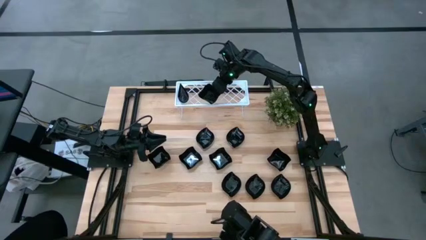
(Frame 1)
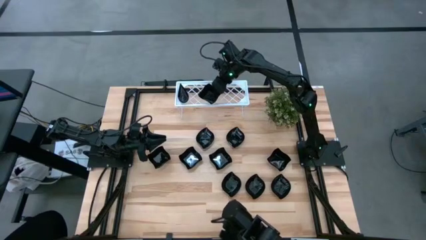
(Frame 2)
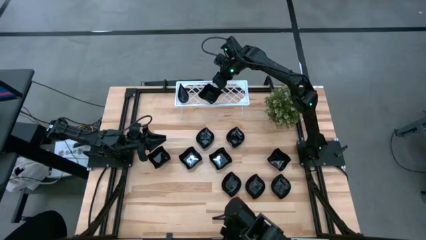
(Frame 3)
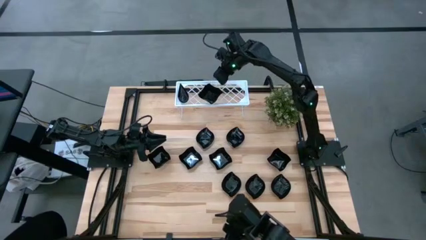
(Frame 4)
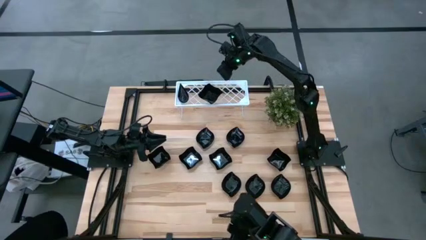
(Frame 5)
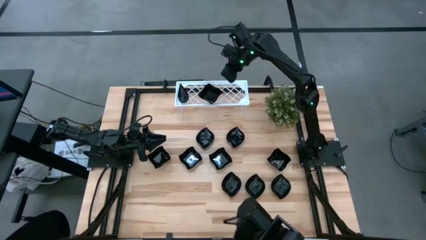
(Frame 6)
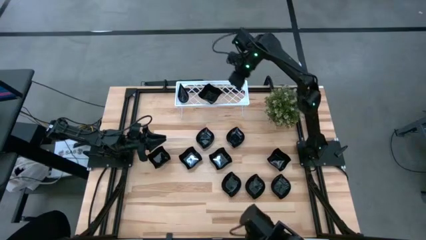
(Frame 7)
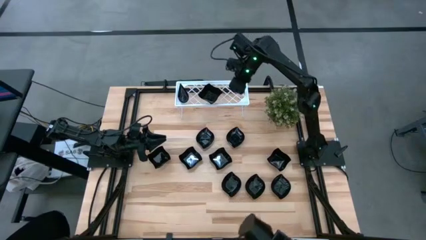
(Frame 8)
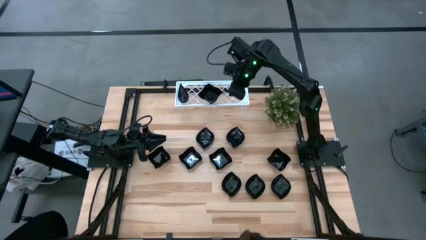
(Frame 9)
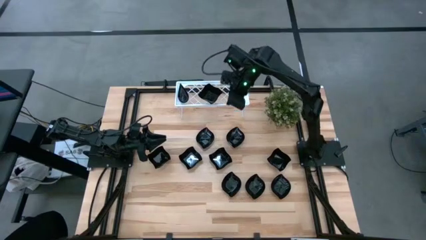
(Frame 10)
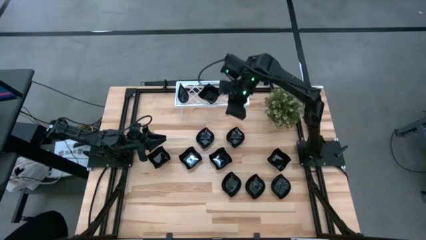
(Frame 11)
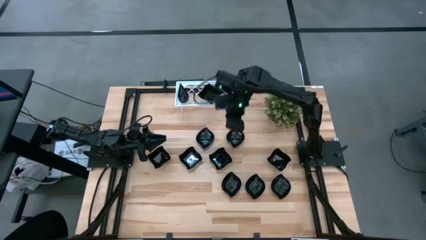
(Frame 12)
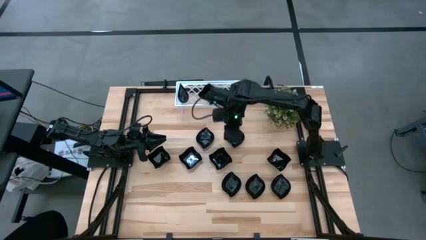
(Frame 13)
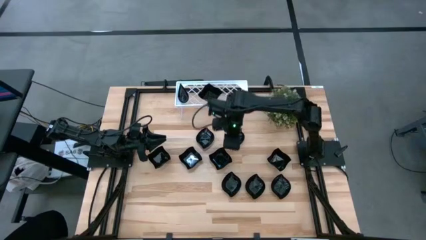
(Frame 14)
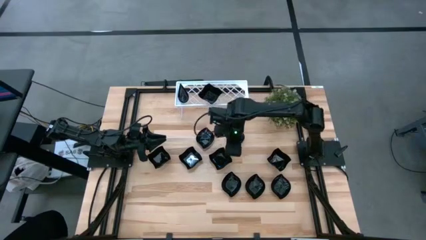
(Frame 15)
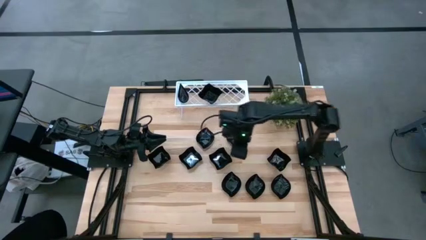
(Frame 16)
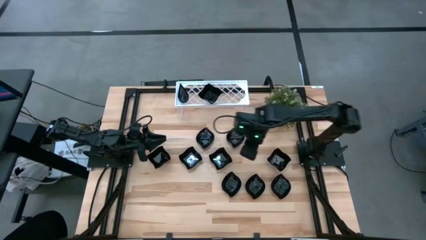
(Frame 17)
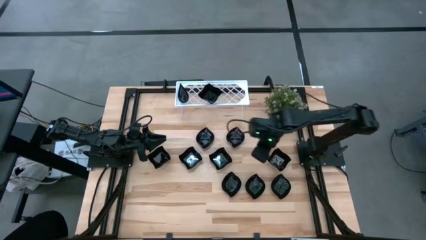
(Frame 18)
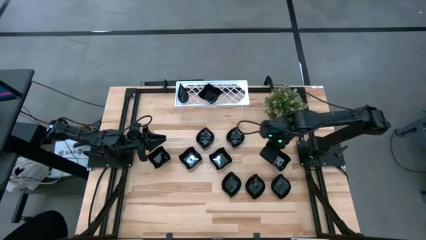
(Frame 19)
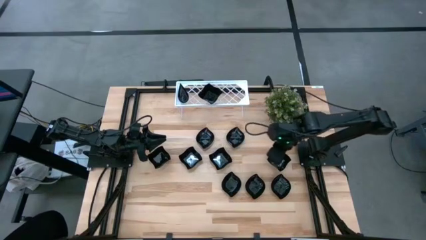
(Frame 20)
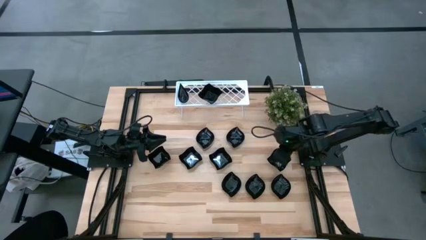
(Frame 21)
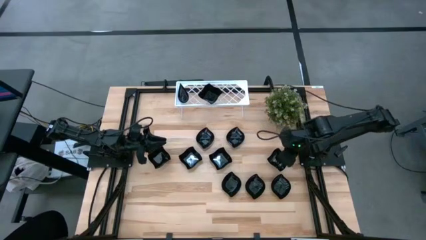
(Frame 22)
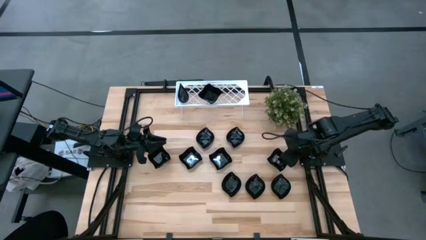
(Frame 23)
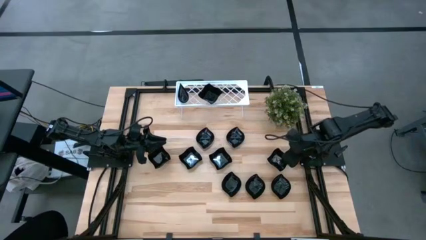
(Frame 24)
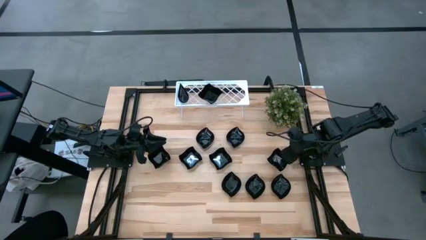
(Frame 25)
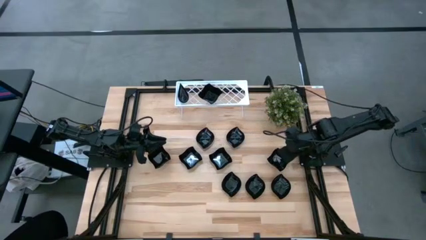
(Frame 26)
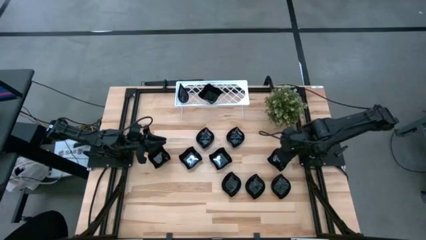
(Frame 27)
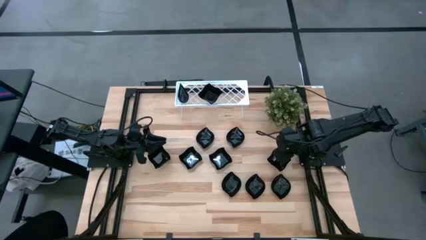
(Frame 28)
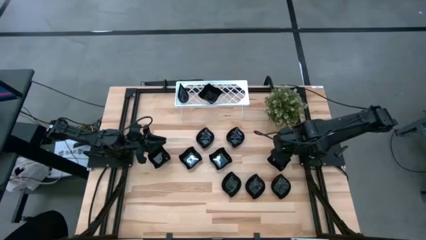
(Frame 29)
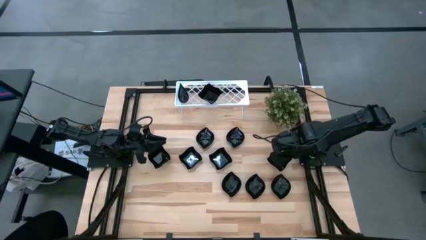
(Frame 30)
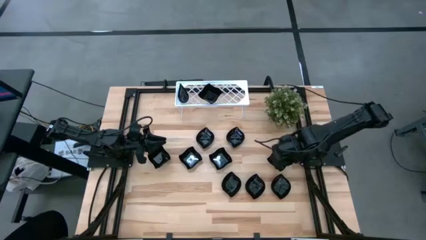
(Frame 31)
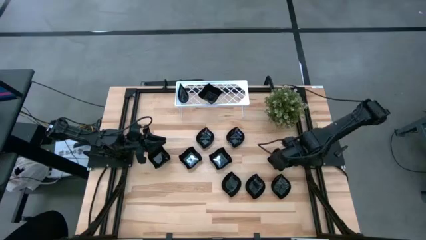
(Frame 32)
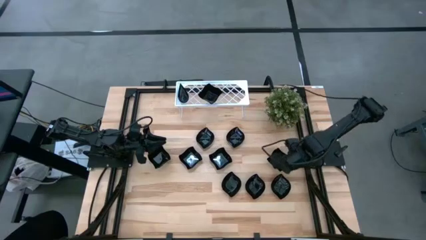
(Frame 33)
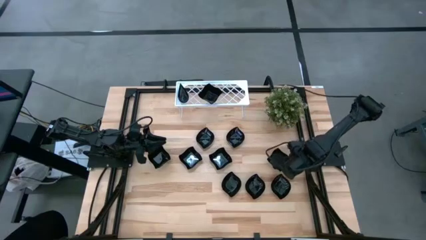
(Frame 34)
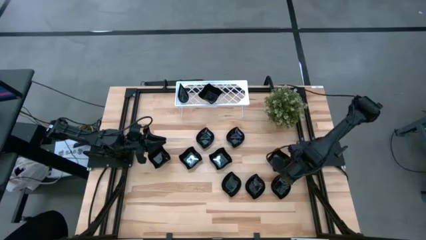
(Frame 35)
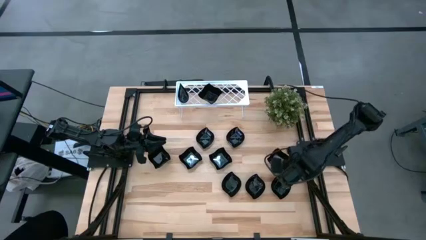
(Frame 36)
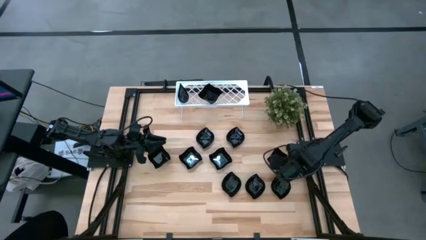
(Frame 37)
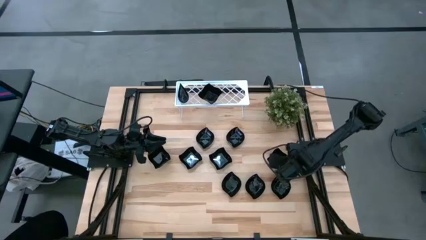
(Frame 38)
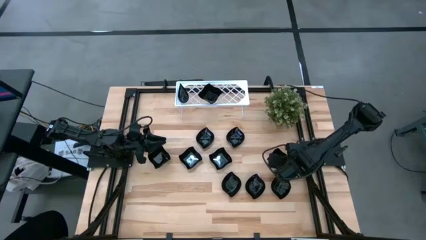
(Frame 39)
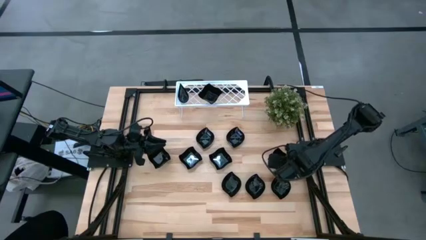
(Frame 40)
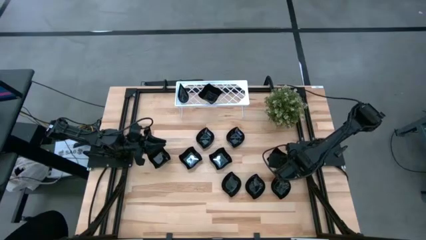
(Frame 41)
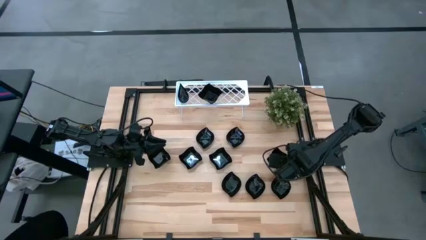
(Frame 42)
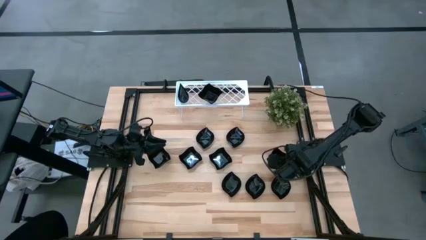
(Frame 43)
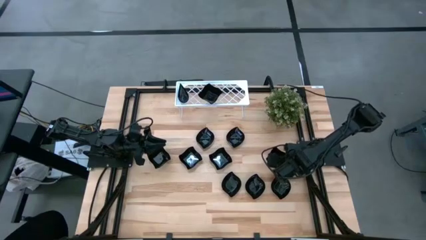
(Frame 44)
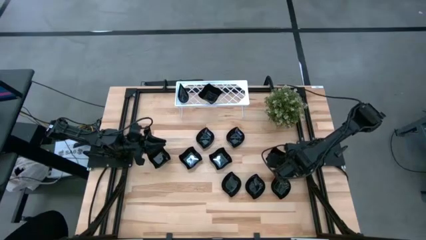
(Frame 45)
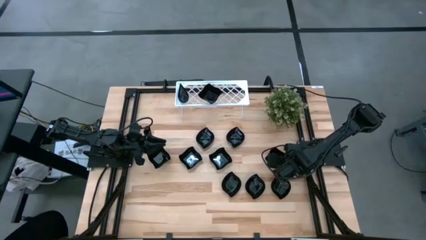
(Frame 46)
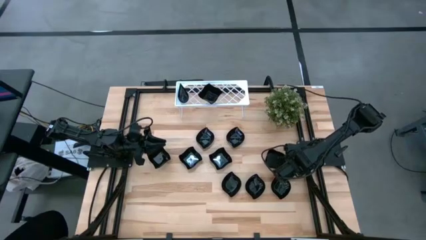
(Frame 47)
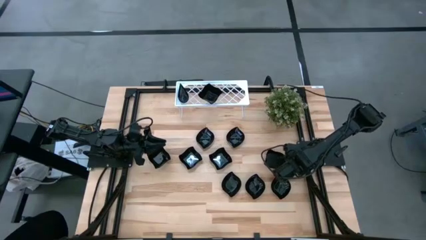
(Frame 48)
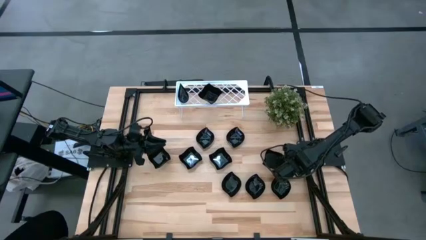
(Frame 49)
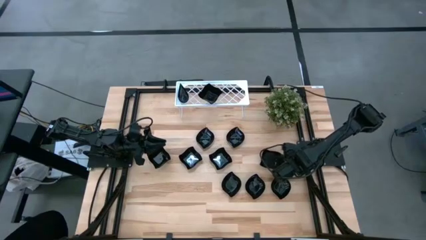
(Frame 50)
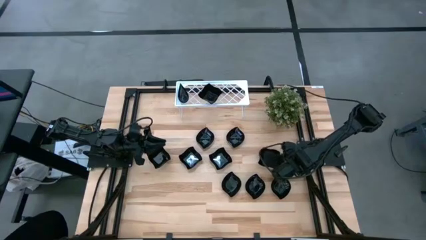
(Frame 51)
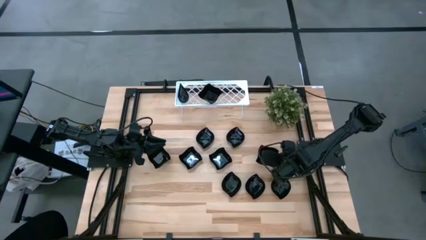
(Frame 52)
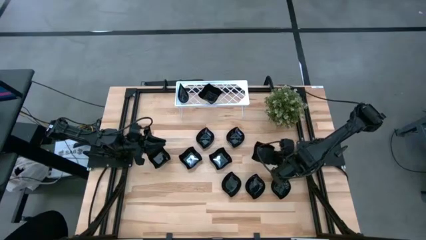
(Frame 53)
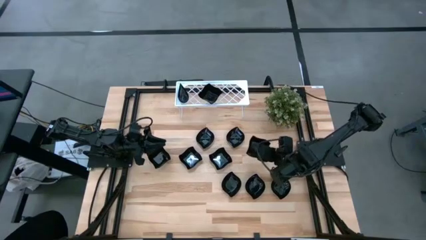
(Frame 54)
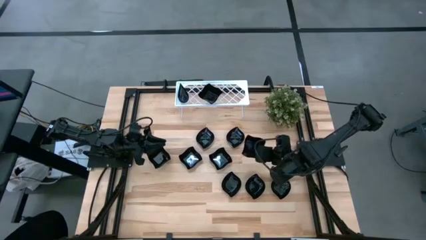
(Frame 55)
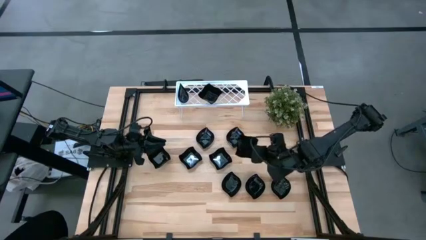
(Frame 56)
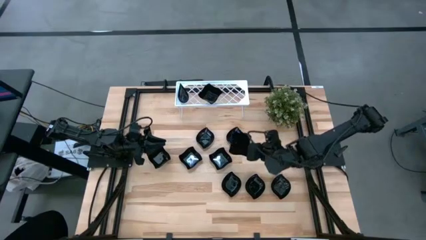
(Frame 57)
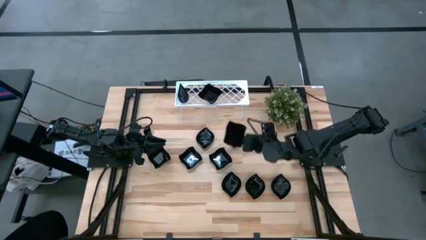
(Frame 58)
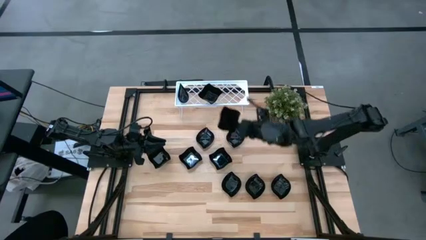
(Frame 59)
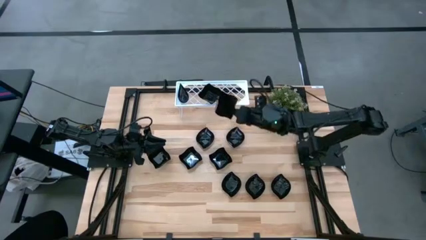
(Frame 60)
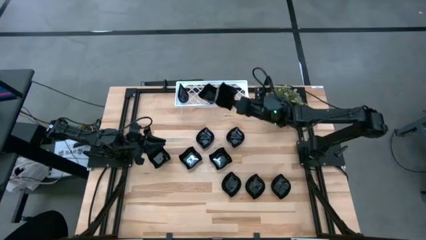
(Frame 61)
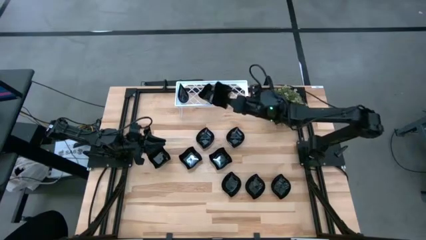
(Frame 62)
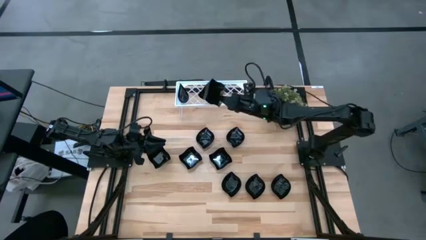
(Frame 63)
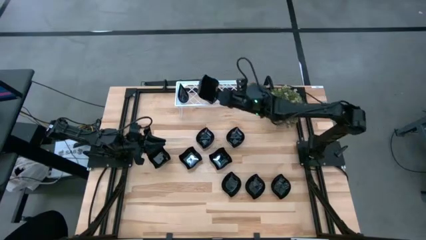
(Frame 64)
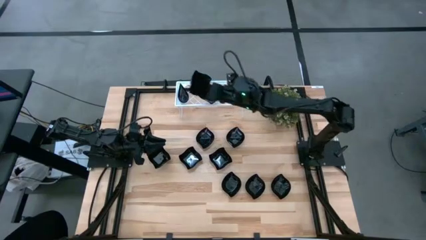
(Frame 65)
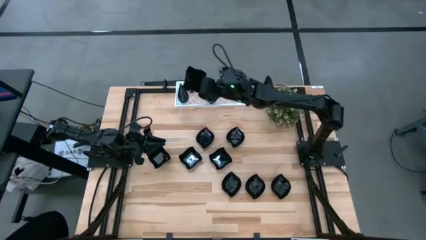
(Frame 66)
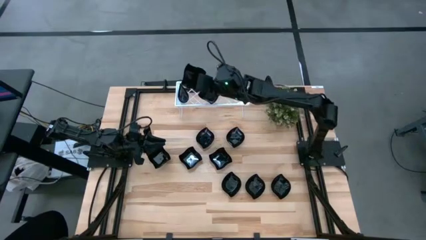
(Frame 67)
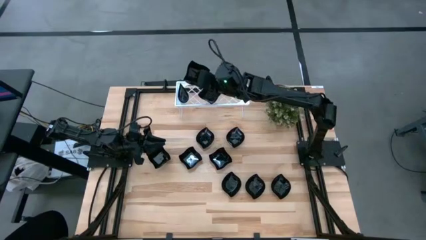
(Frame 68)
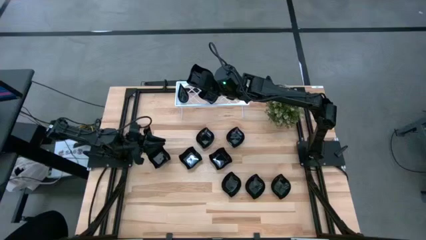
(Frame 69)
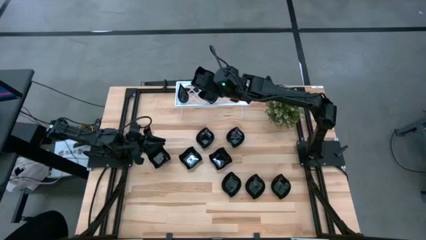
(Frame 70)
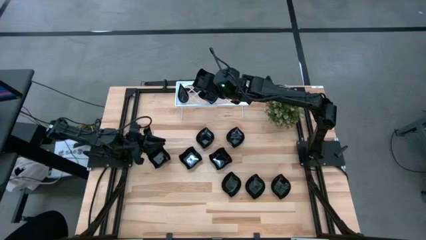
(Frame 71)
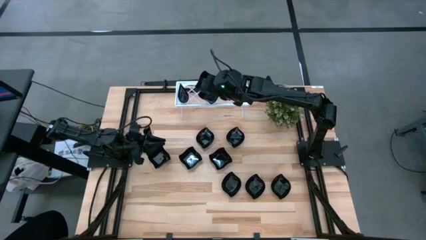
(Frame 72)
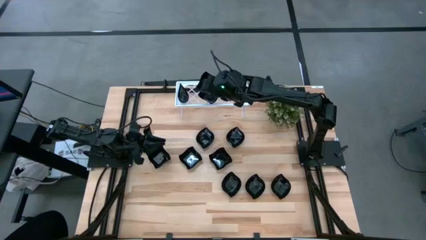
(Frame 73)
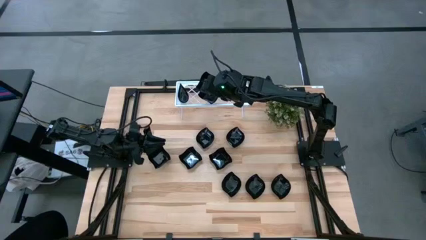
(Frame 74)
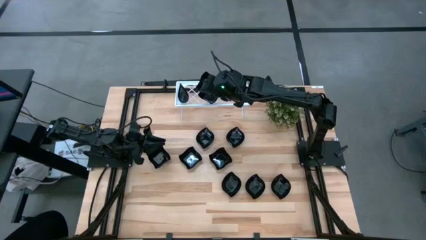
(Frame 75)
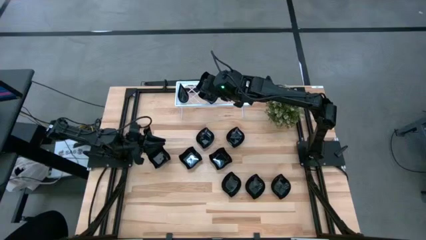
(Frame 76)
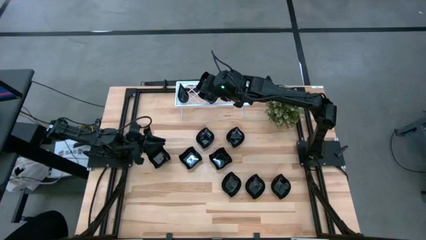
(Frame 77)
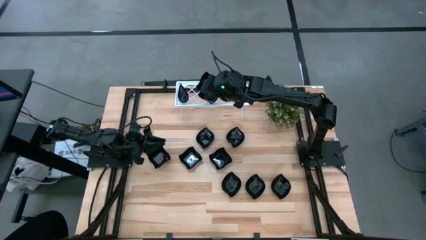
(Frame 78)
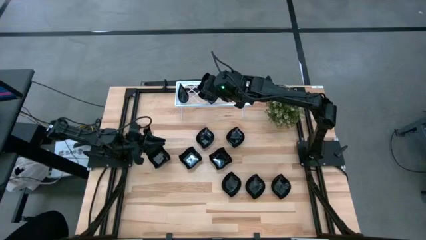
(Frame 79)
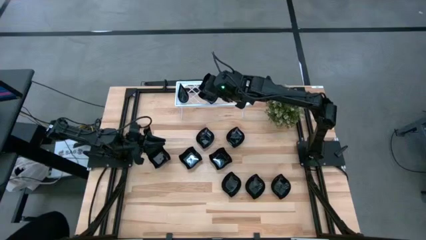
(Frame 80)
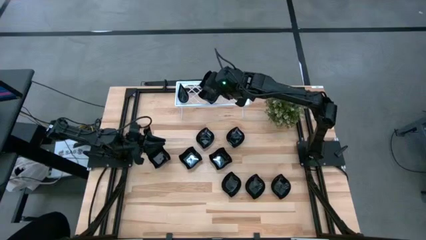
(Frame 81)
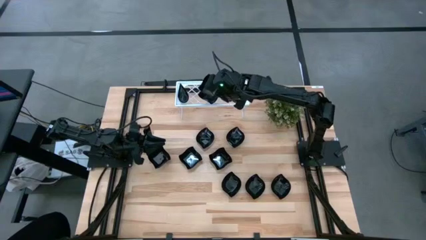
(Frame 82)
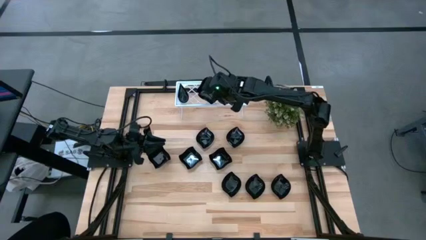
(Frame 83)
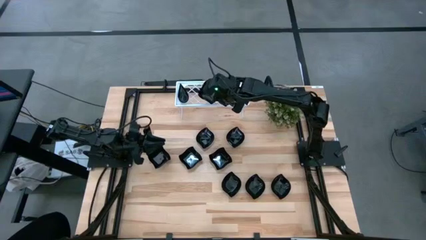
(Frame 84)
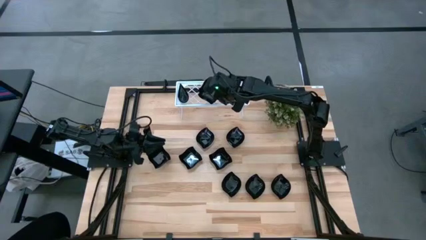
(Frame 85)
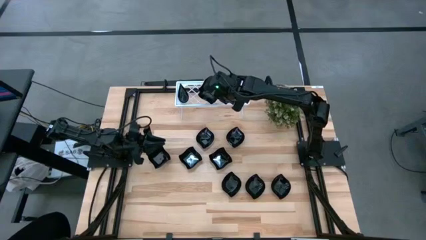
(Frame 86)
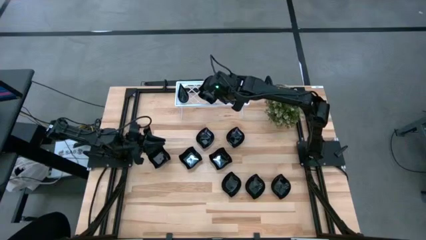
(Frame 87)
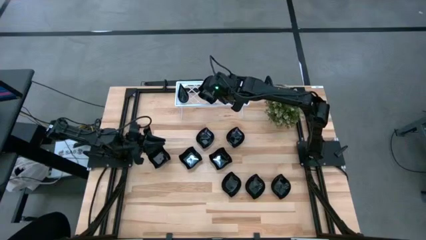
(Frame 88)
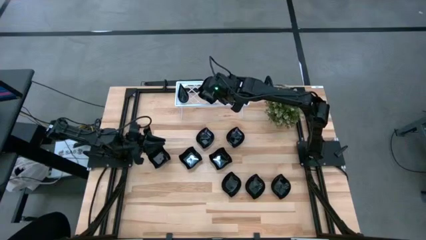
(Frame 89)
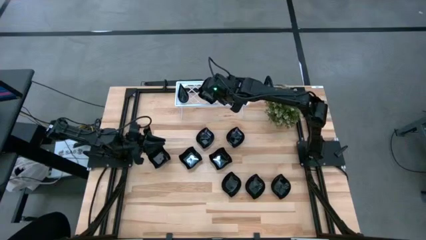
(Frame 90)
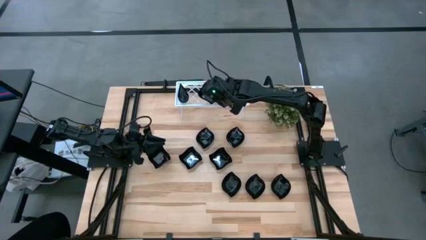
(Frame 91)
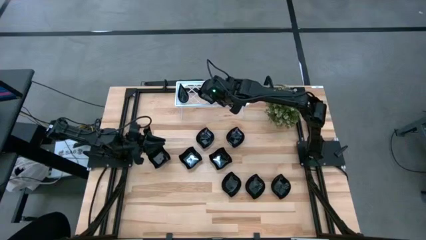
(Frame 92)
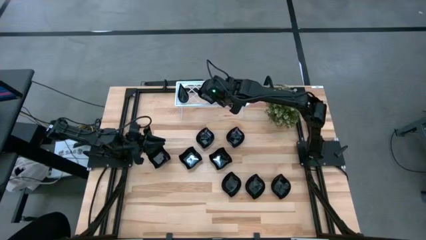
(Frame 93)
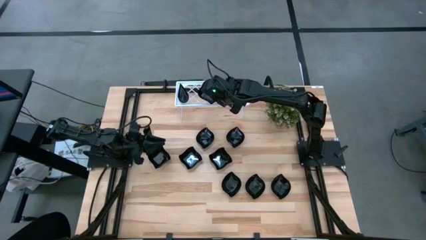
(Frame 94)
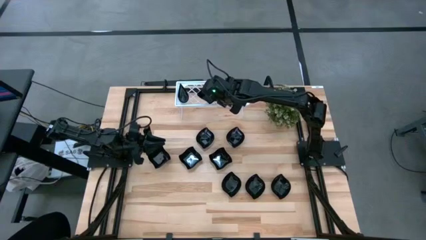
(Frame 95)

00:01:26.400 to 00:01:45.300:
Task: Pick & Place Mini shaped plates
Stack the distorted square-shaped plate on top of the distorted square-shaped plate on the shelf
